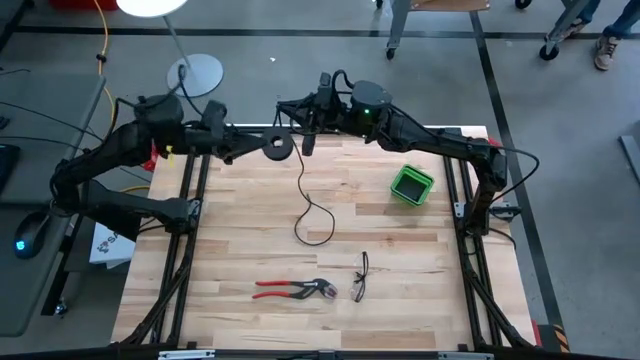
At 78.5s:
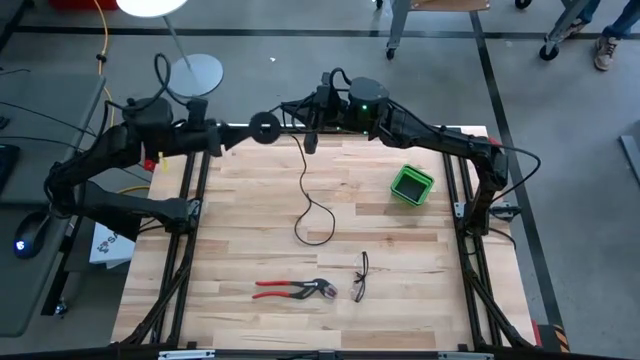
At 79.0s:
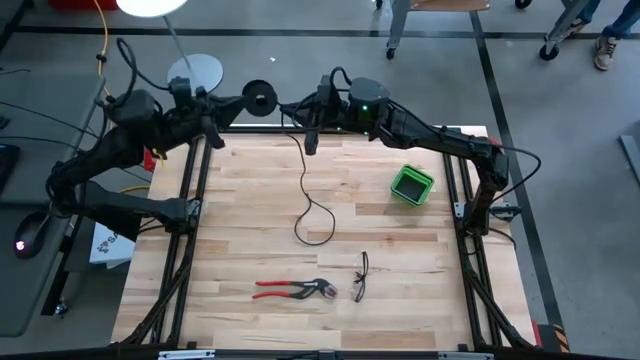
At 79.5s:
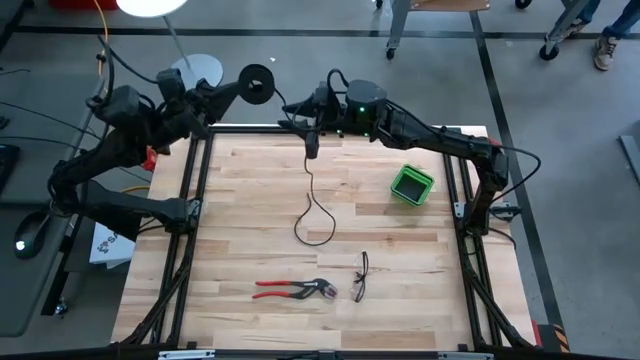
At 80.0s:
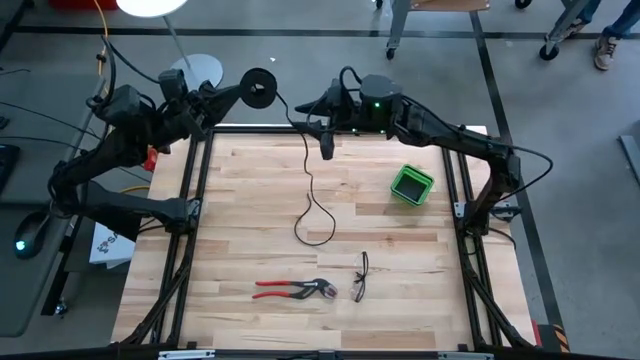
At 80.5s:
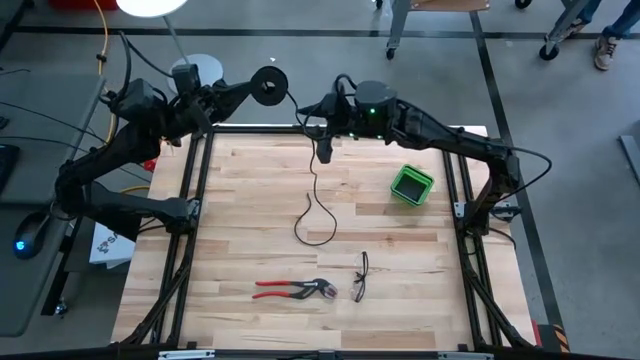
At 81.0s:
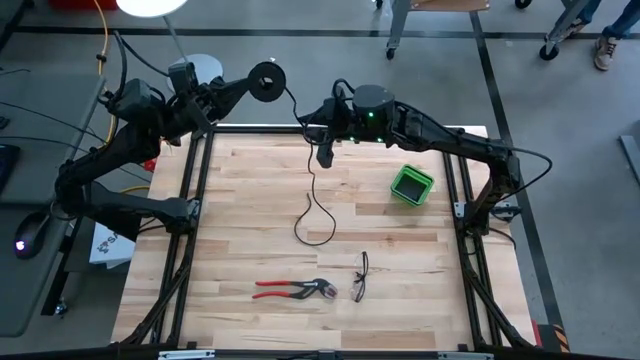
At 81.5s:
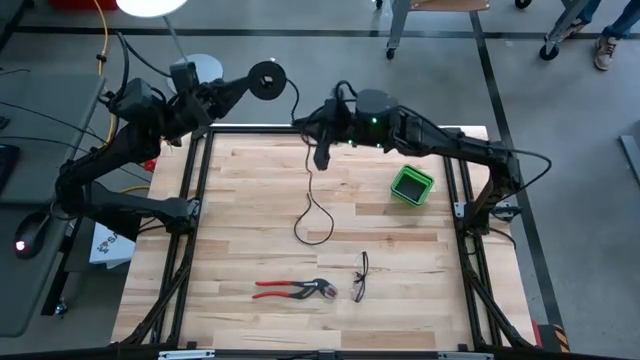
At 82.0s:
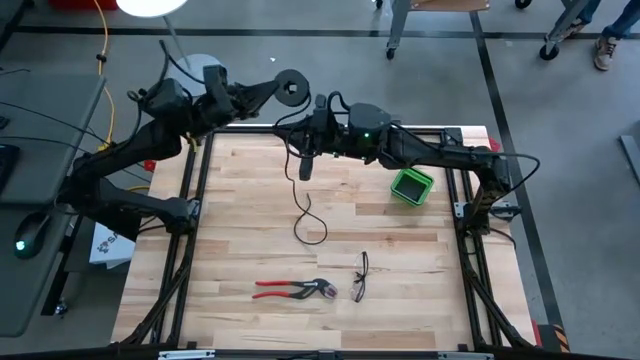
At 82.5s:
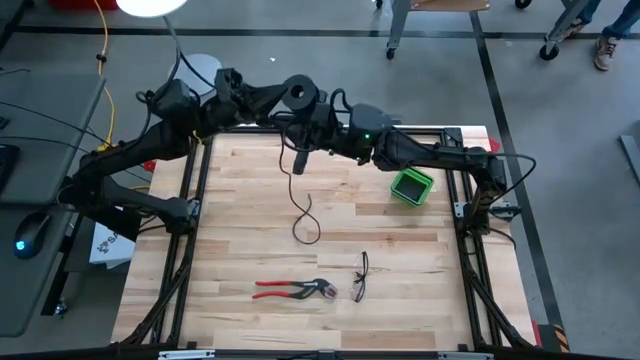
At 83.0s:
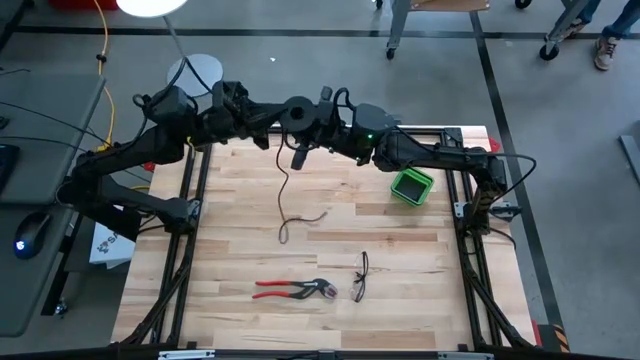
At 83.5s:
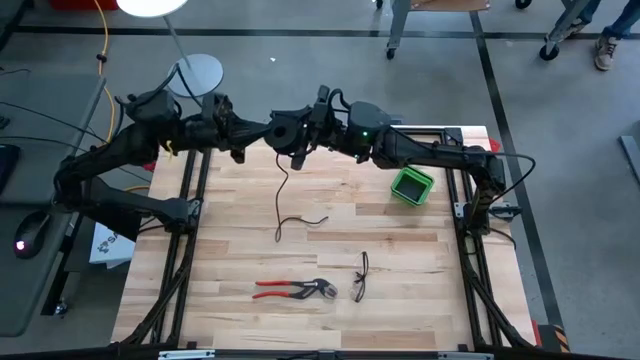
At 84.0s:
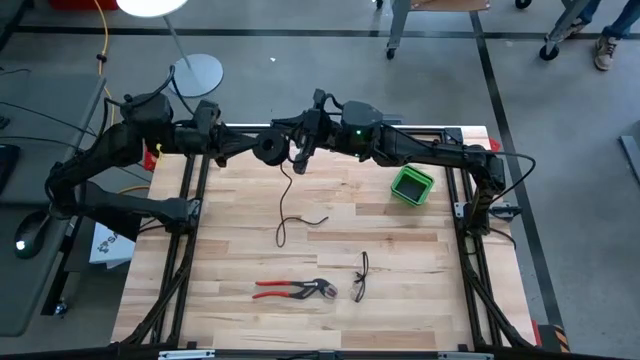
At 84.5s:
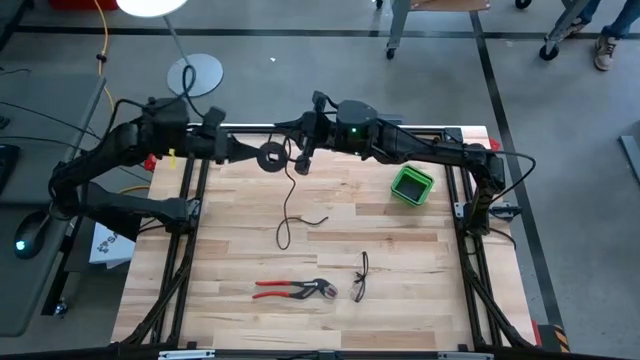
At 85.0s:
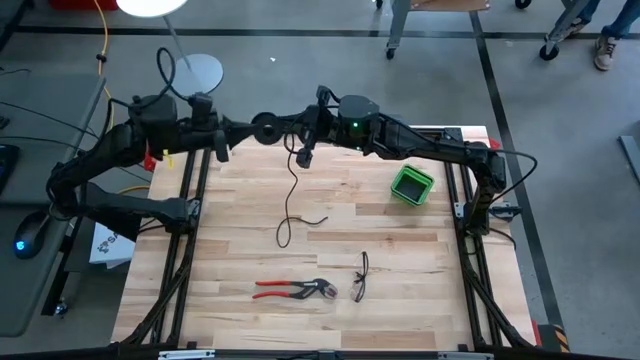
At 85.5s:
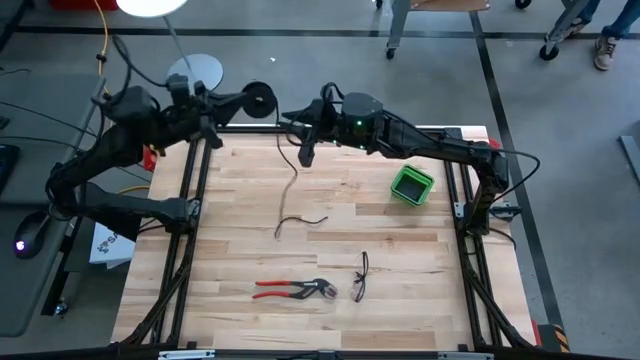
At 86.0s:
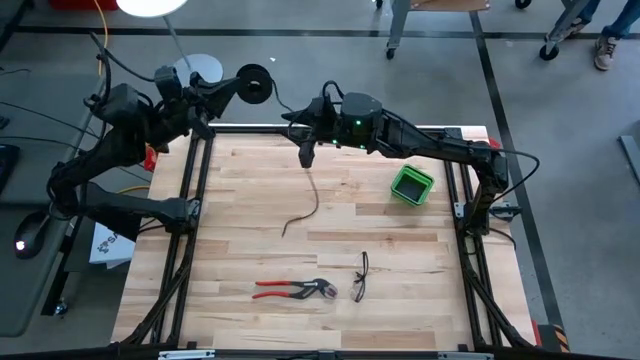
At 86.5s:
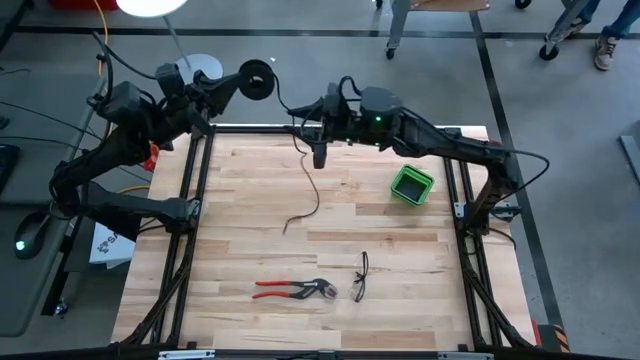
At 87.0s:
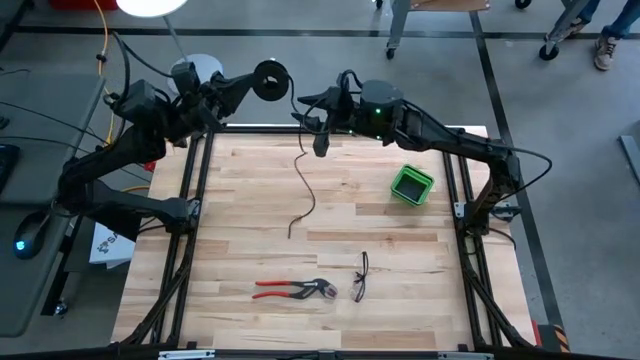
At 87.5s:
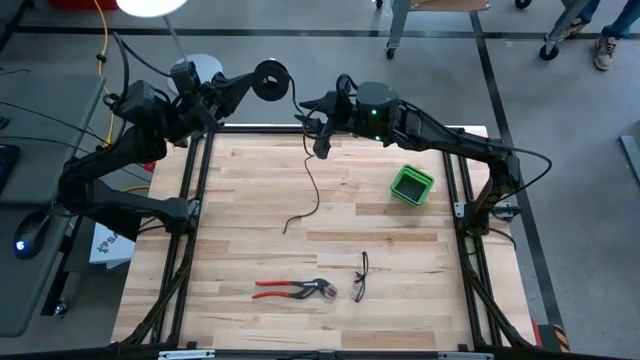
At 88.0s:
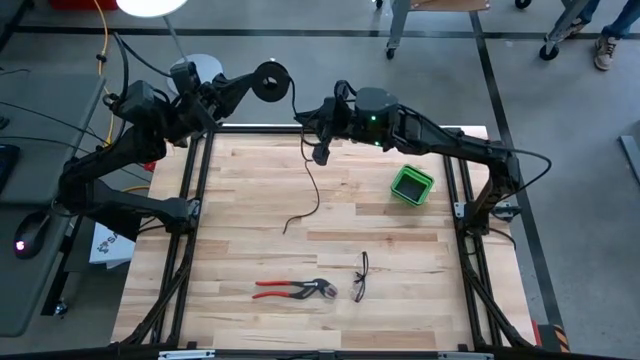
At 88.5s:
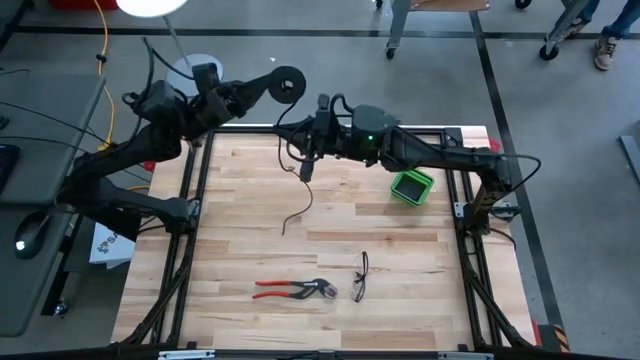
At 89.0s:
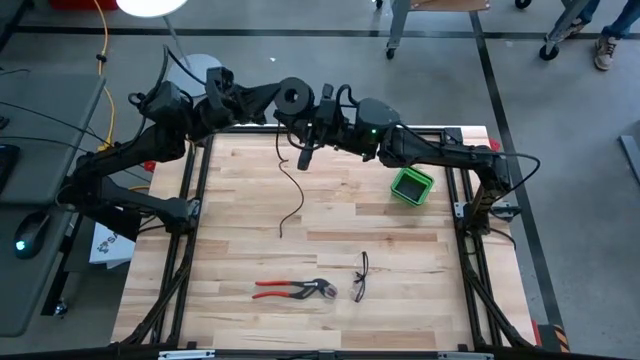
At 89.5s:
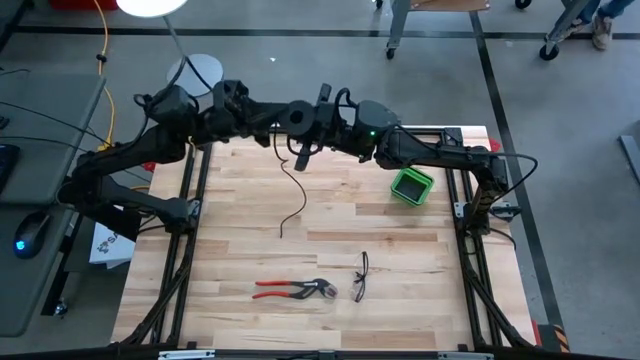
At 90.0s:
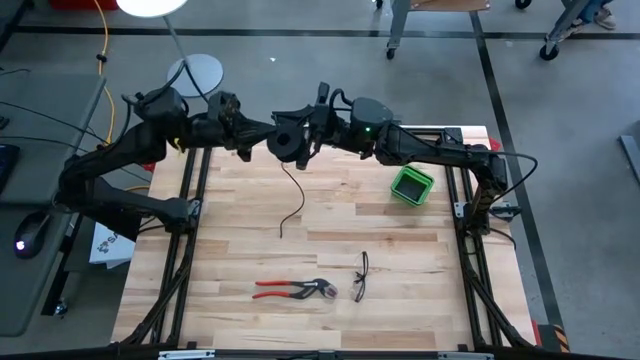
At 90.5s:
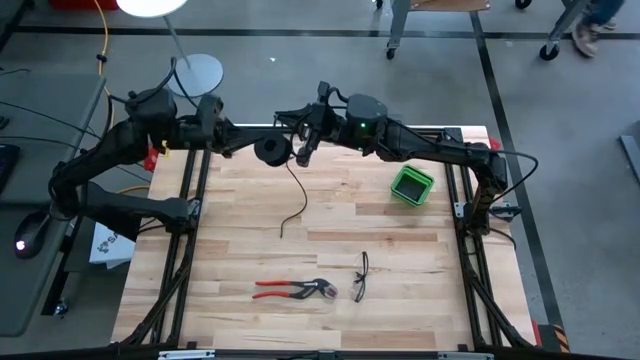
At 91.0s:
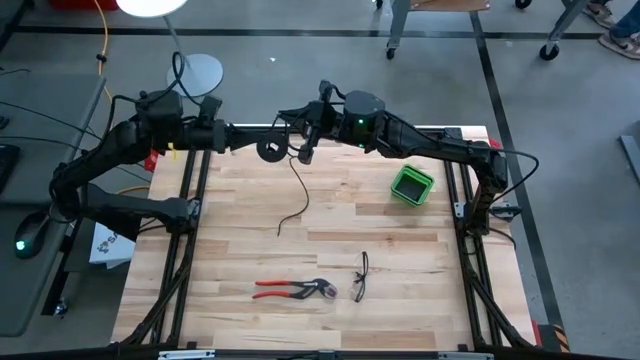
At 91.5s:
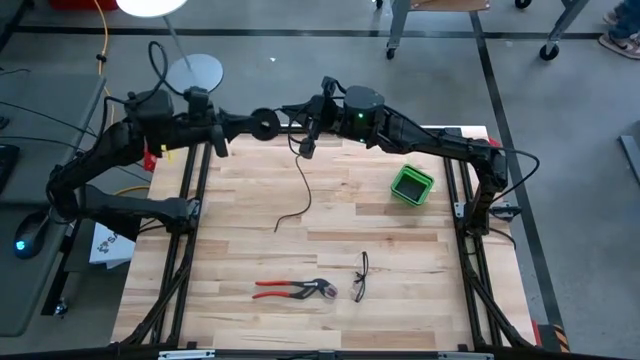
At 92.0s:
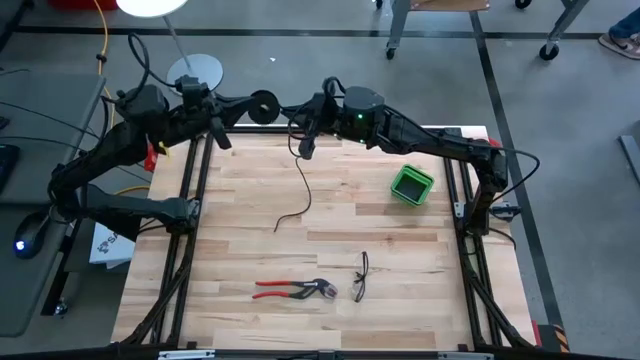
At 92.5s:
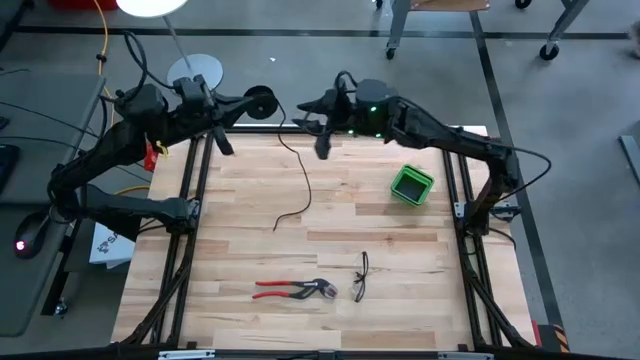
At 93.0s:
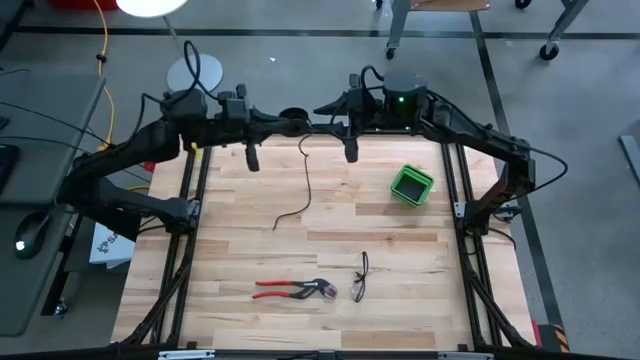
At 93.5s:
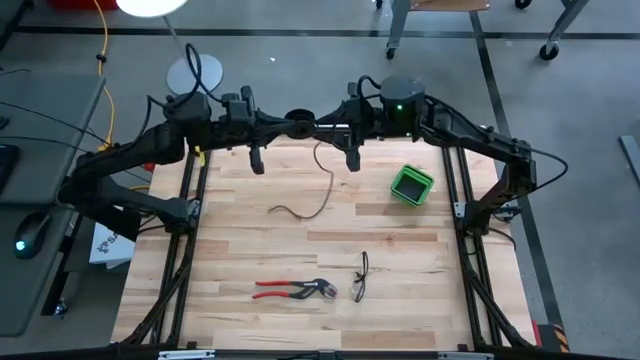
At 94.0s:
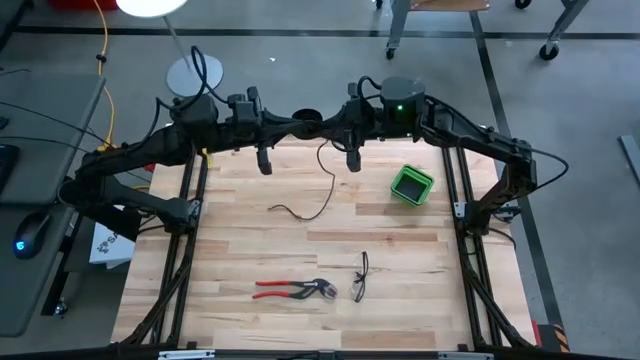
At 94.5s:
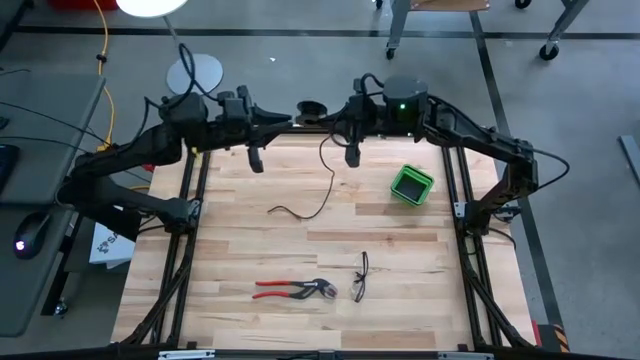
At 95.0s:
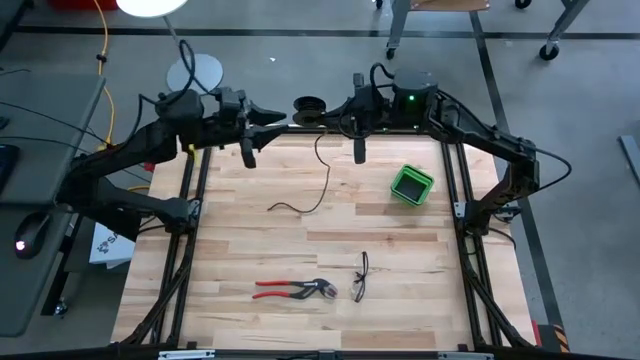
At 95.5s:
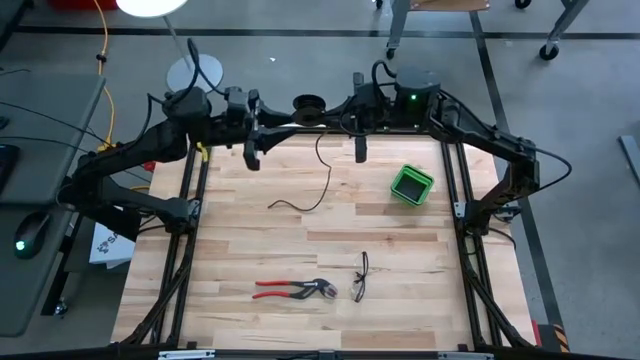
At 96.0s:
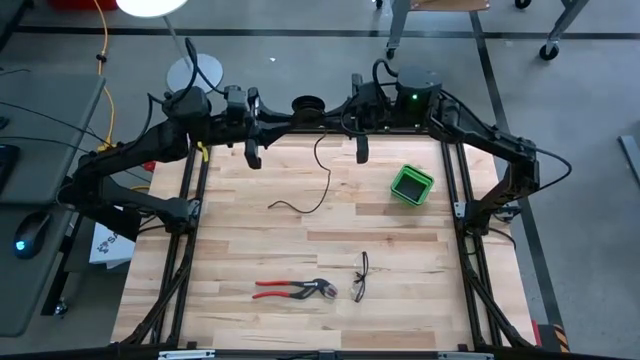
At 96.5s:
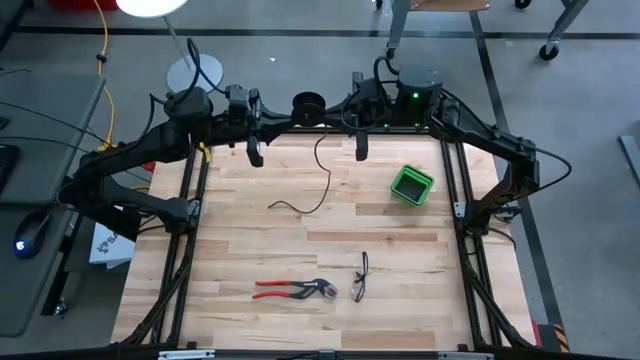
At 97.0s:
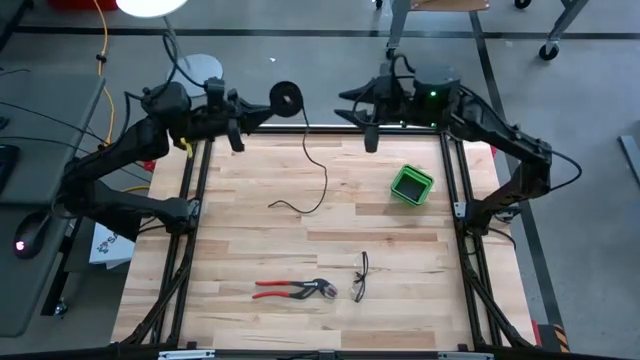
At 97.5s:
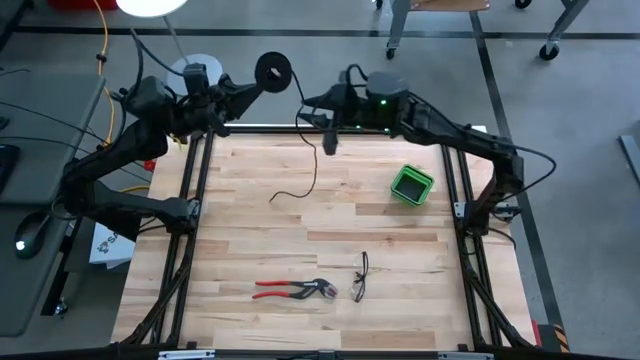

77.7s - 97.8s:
Task: Coil cords
Coil the black wire onto the black spool
